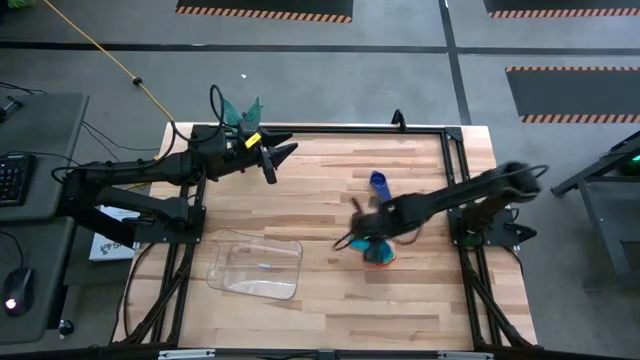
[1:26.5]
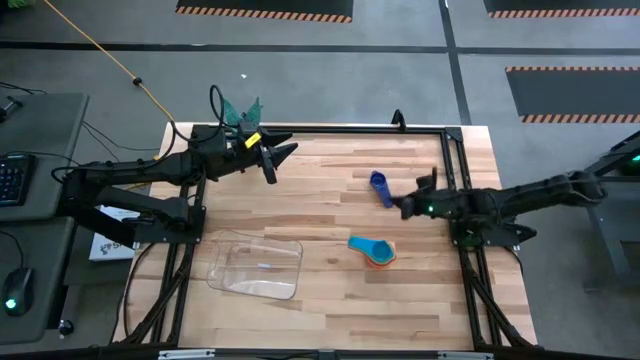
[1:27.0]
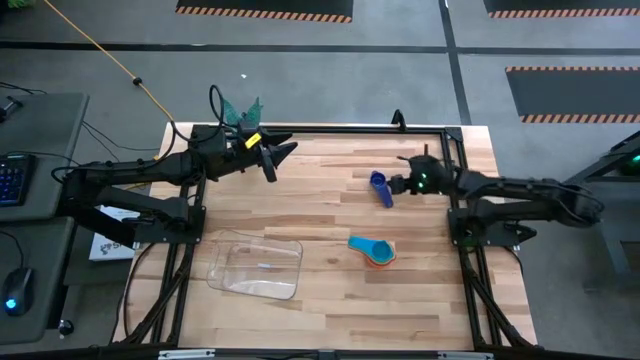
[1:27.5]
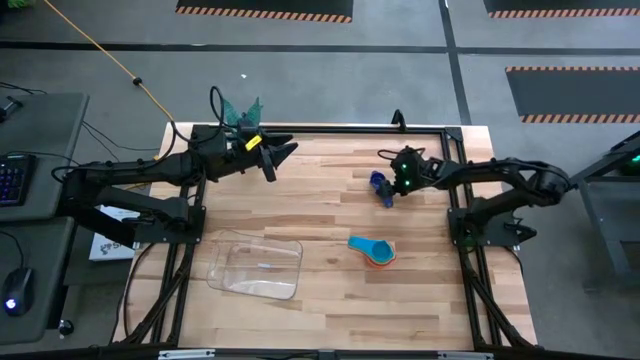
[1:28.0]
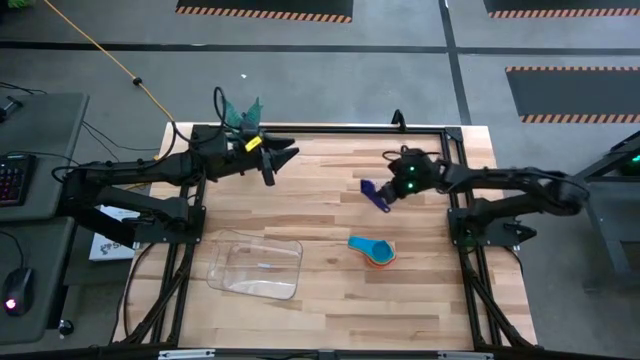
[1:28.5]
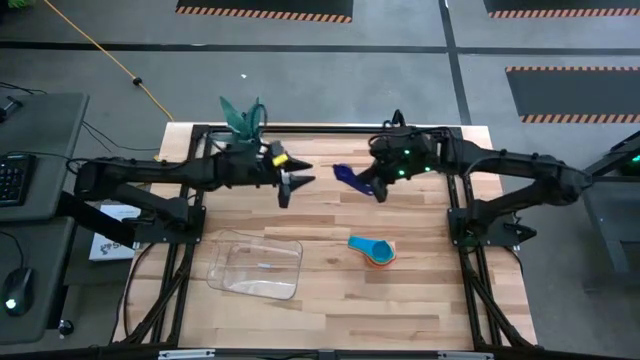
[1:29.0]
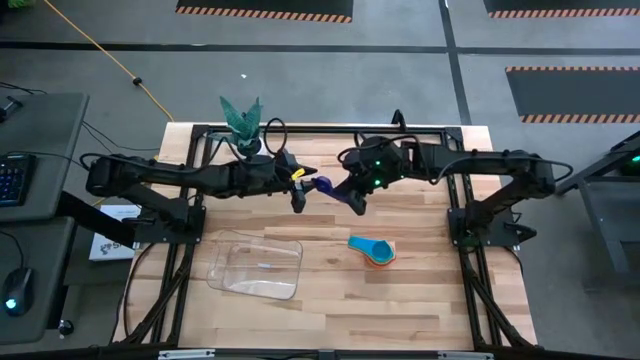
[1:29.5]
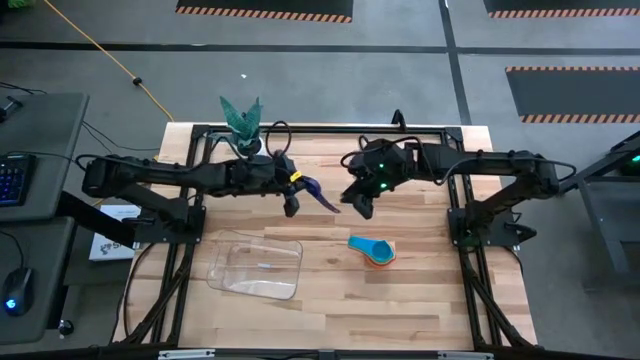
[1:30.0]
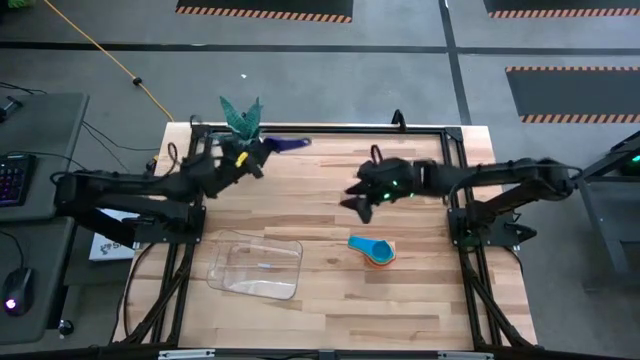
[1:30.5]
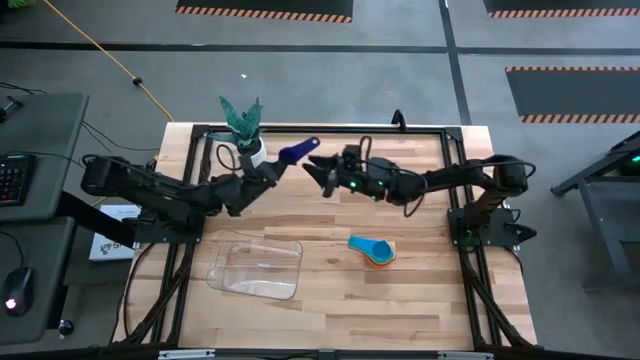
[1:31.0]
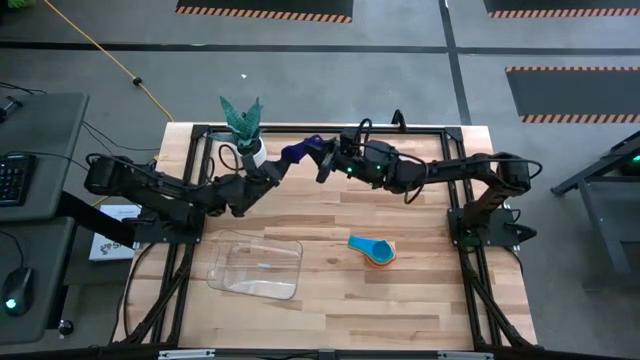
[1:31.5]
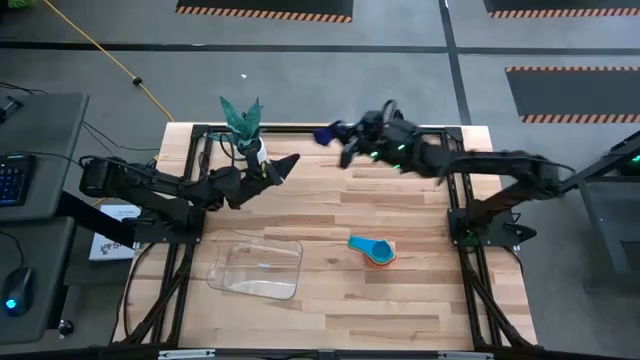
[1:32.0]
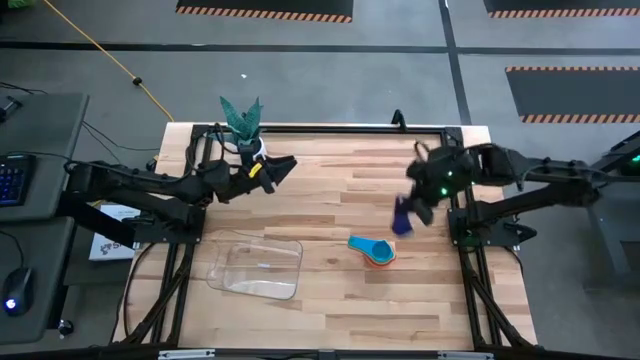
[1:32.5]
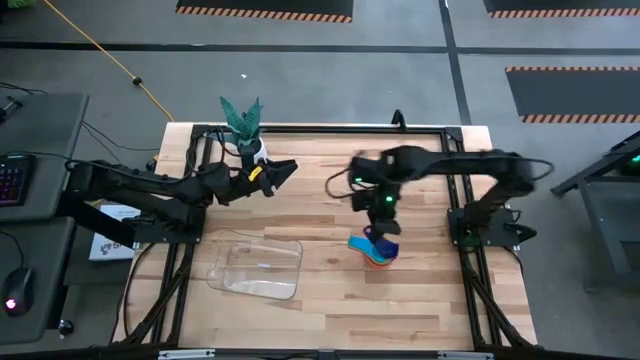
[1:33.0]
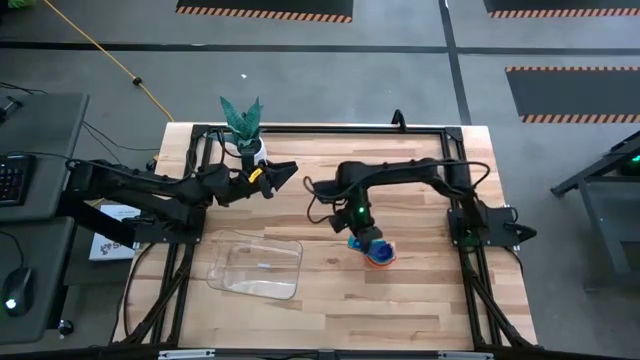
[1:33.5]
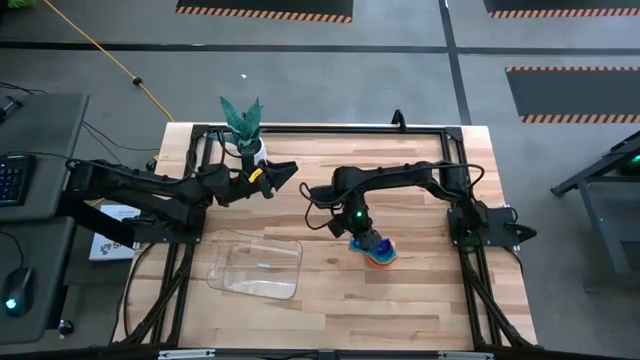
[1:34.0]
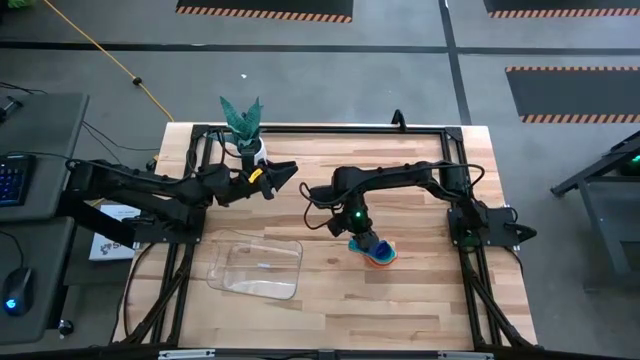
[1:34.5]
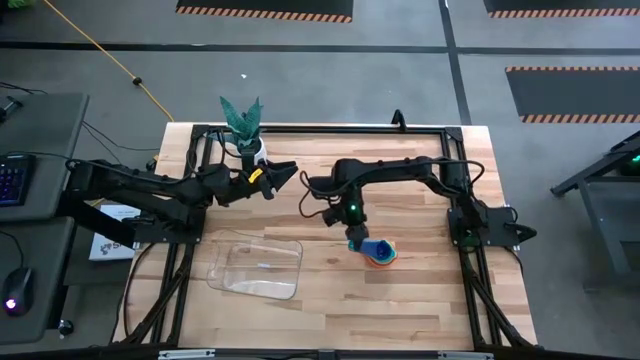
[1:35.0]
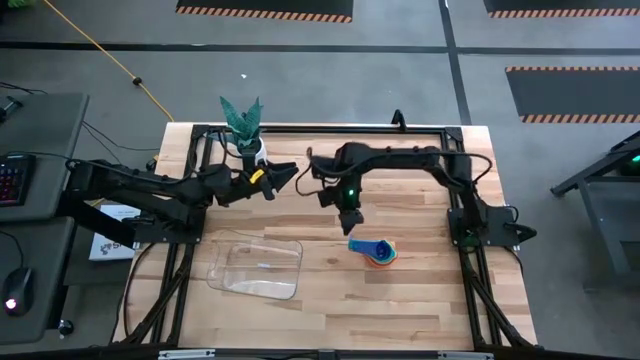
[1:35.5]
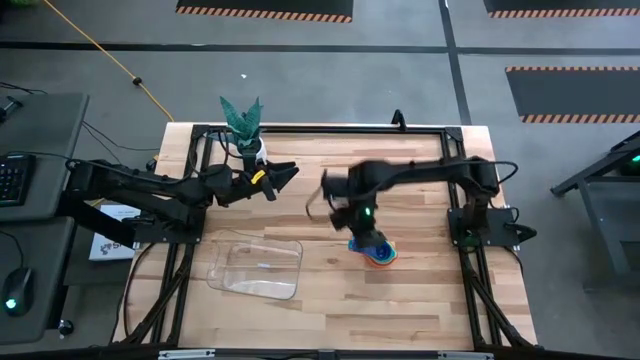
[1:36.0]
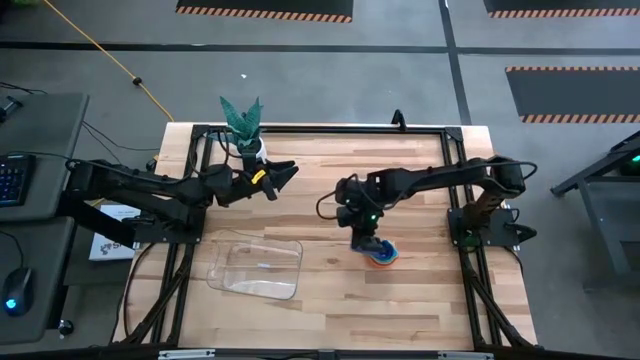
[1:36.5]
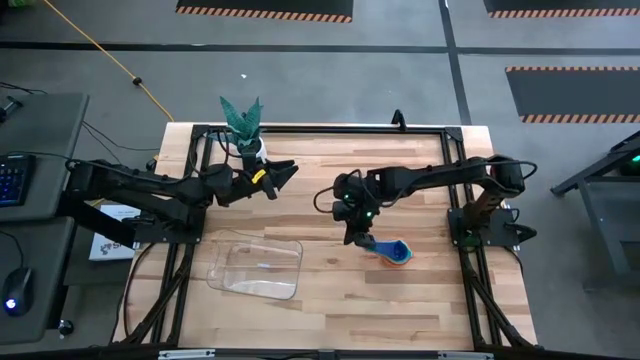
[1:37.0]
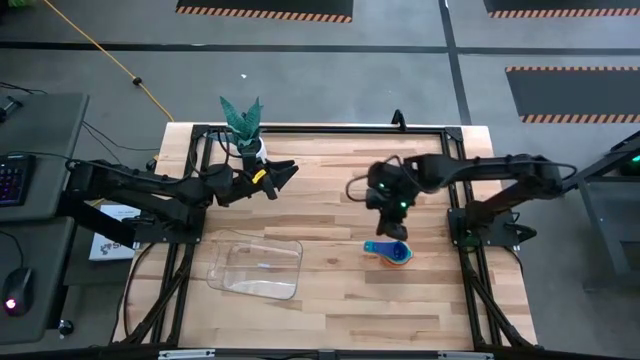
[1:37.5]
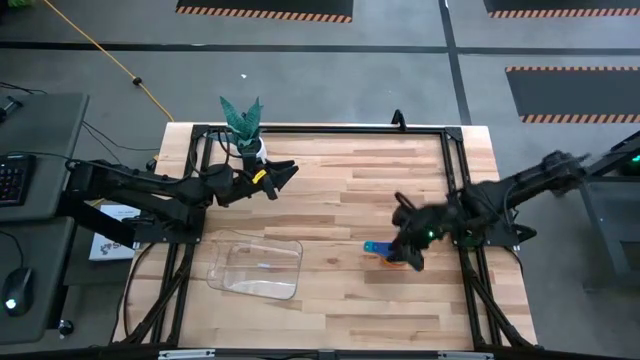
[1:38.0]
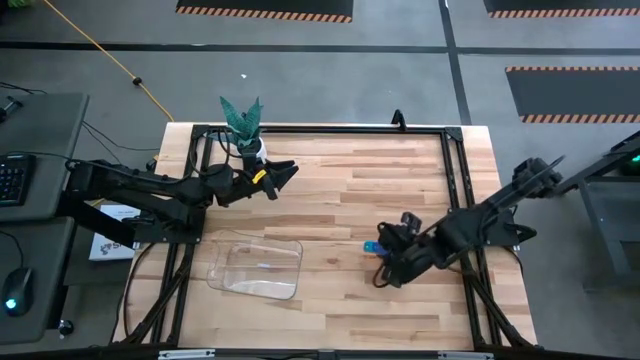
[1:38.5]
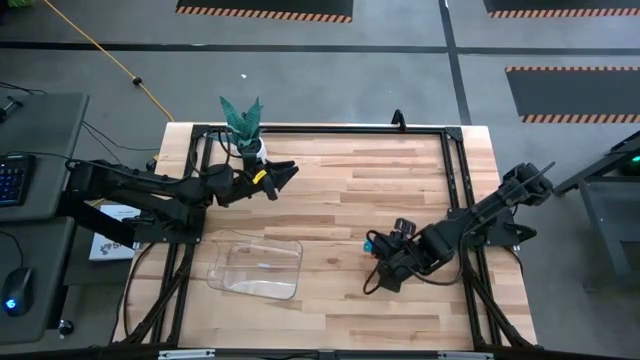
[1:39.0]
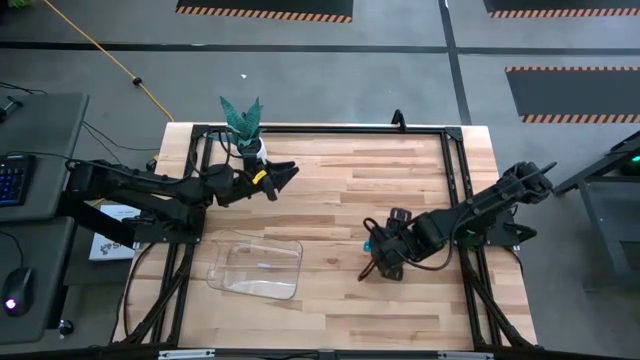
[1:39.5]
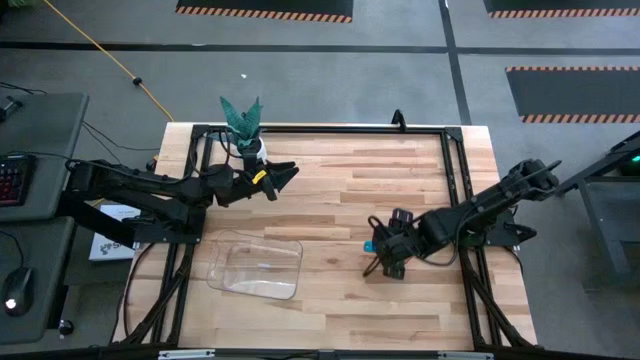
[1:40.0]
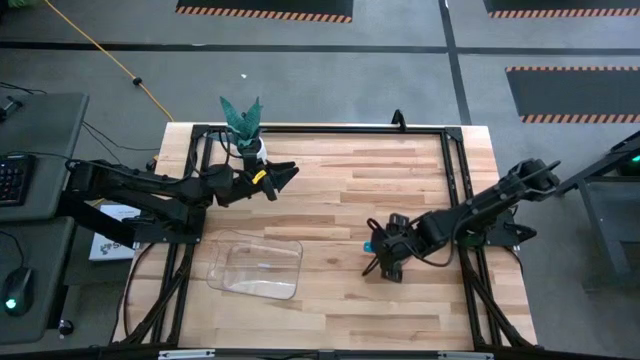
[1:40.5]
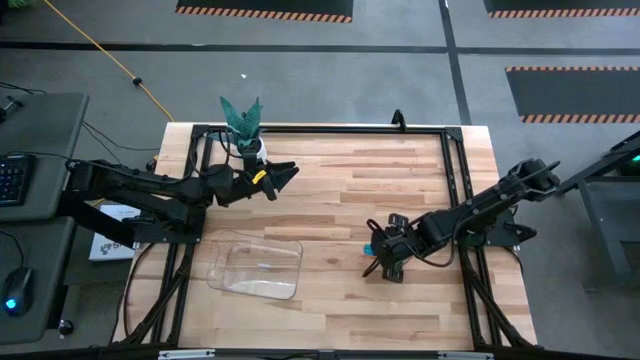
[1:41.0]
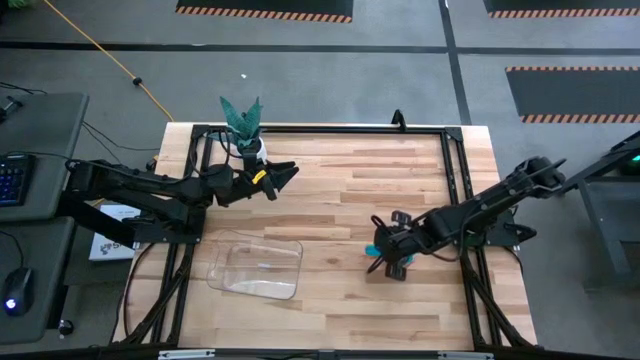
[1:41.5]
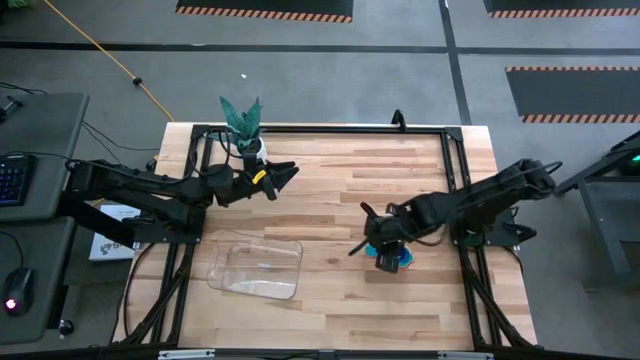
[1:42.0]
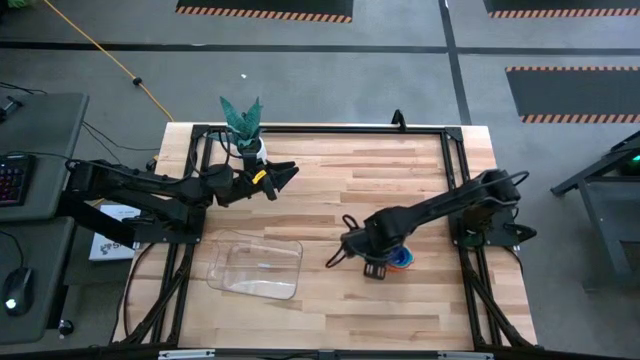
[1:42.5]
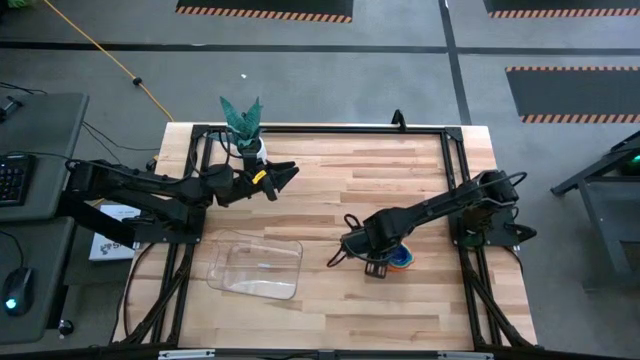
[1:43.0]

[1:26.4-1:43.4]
Task: Nest measuring cups in basket
Stack the dark blue measuring cup on top of the light blue measuring cup

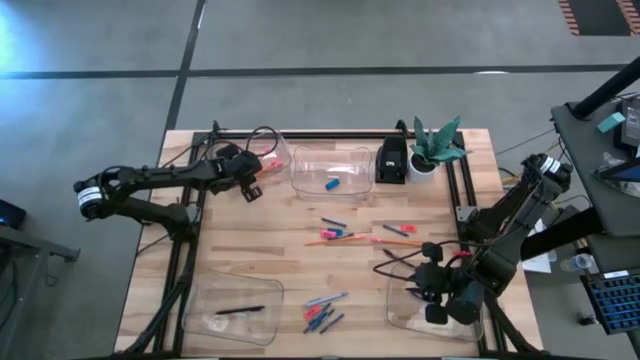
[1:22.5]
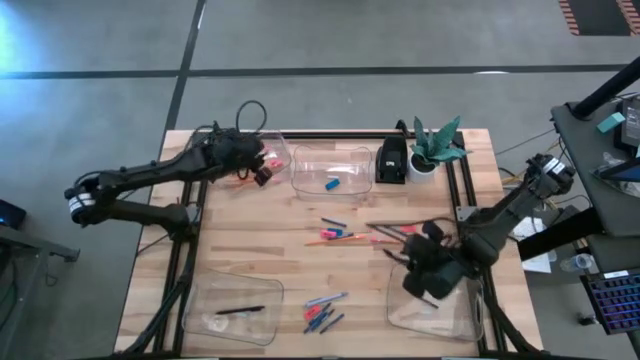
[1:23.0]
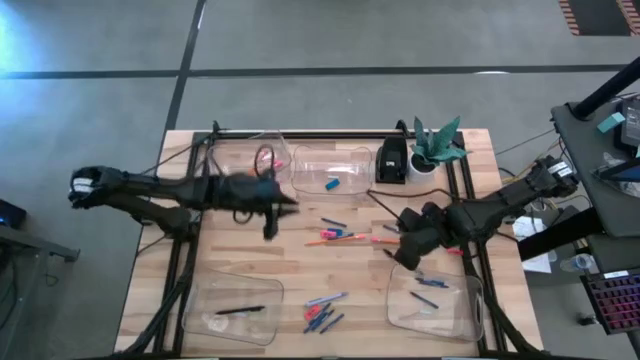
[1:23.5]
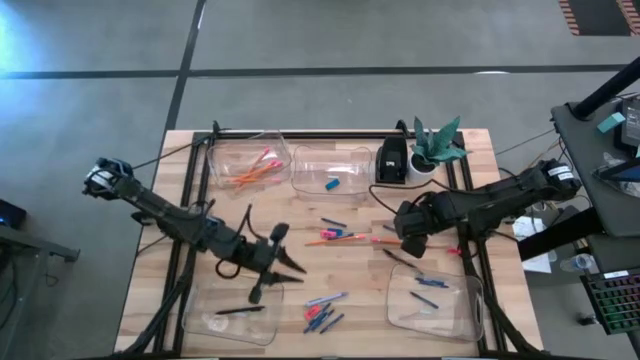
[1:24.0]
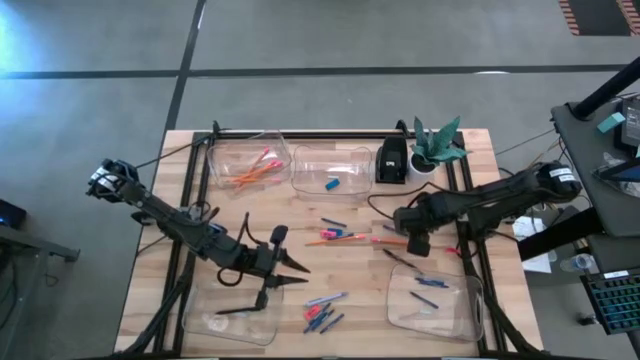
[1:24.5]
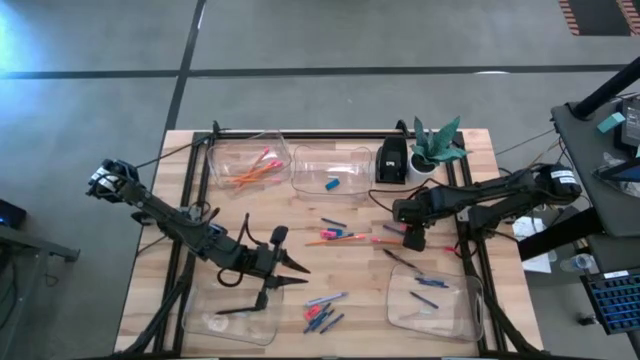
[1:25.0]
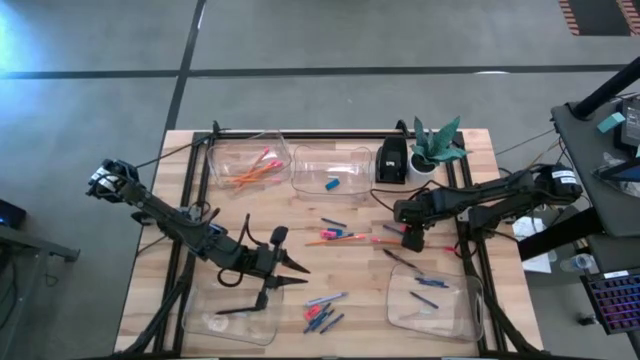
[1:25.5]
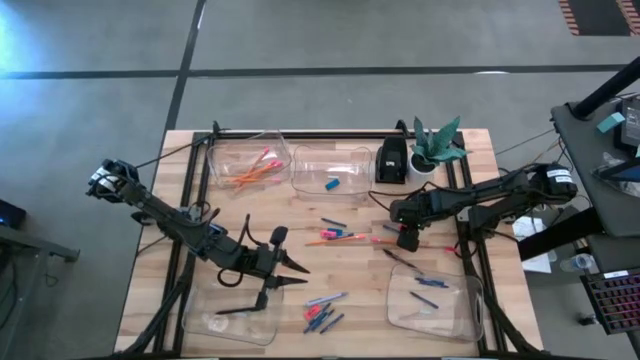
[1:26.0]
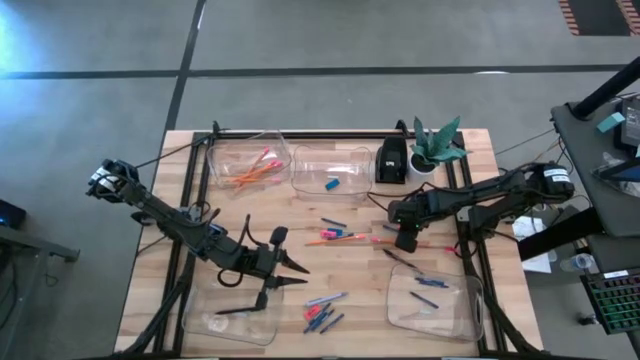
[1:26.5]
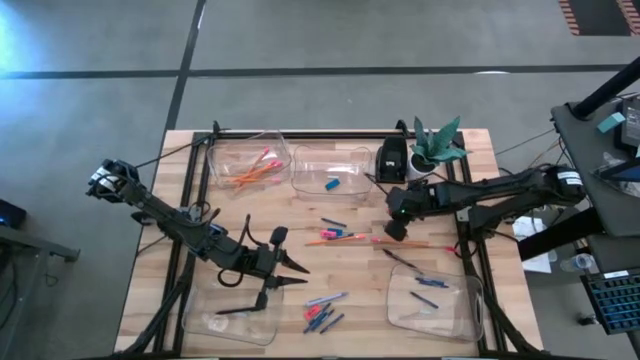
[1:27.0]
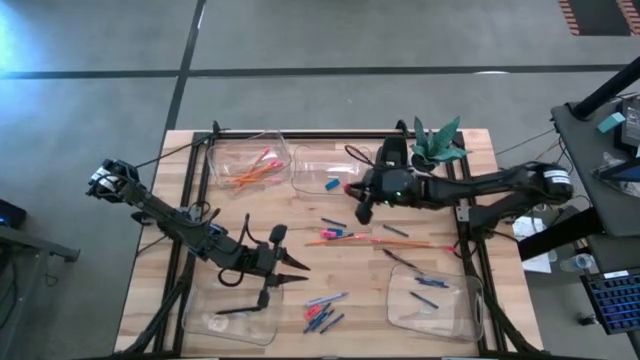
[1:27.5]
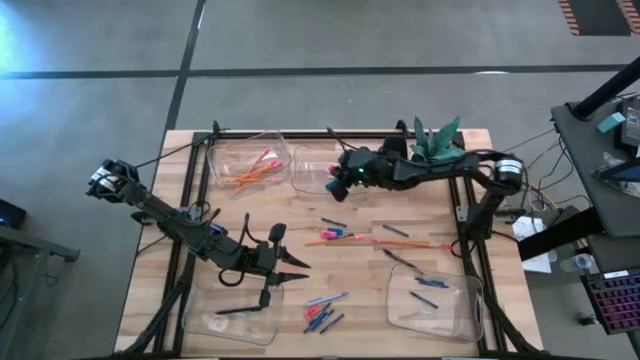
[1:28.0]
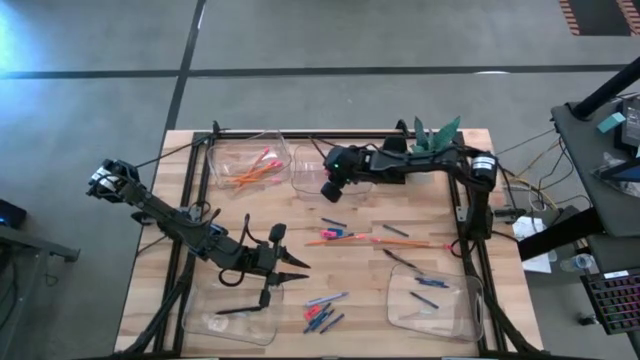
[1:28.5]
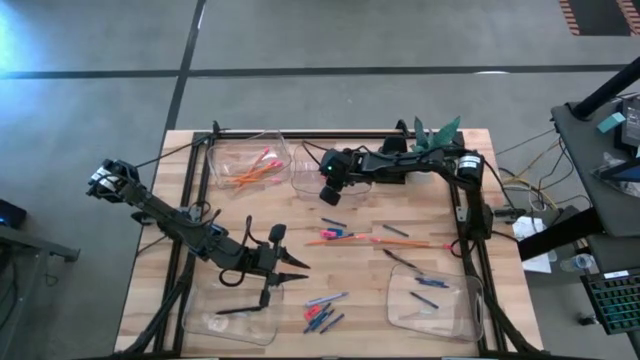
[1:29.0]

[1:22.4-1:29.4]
Task: Sort crayons/erasers/pens/pencils in bins
Put the orange eraser into the top right transparent bin
